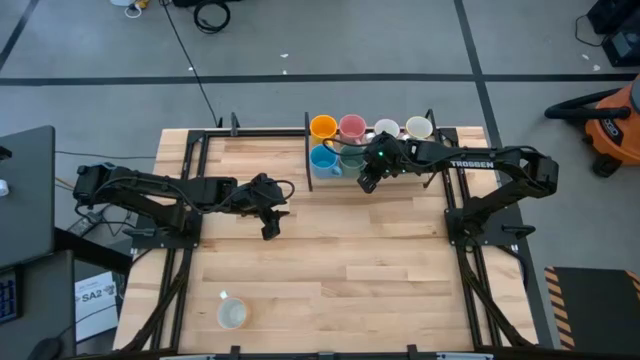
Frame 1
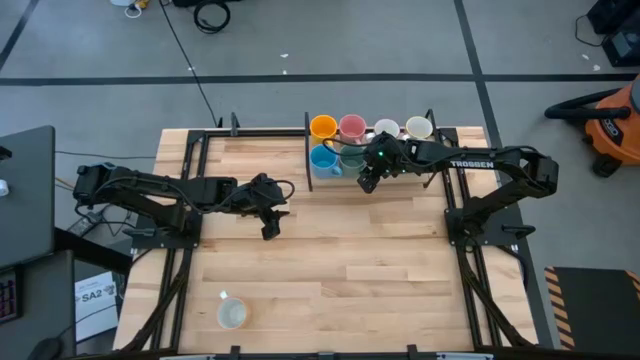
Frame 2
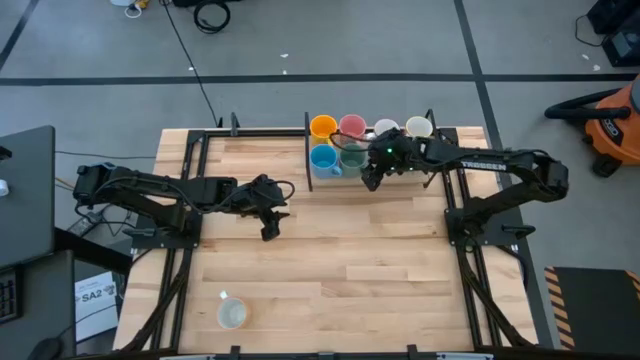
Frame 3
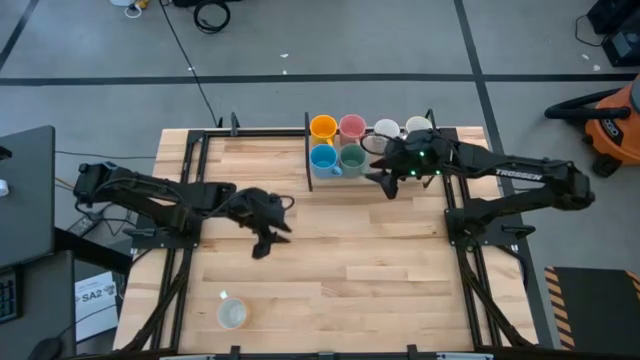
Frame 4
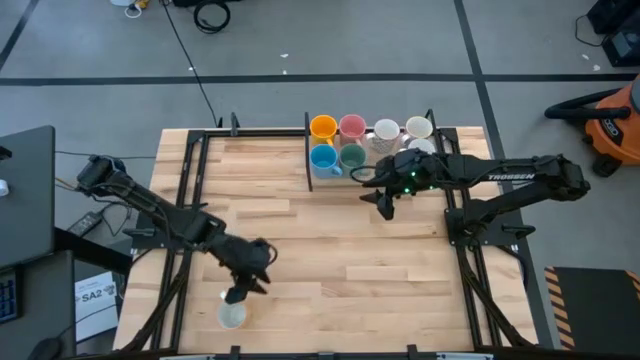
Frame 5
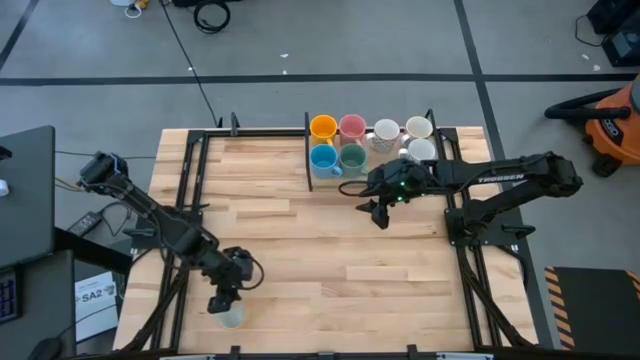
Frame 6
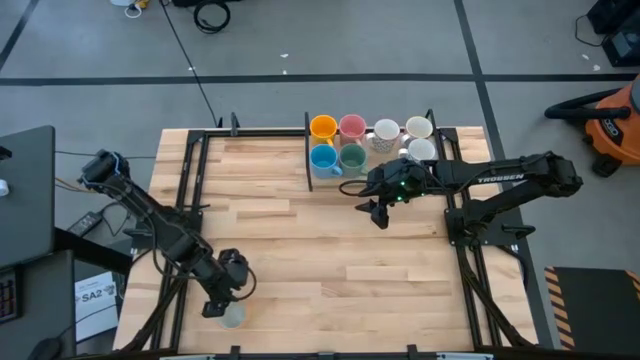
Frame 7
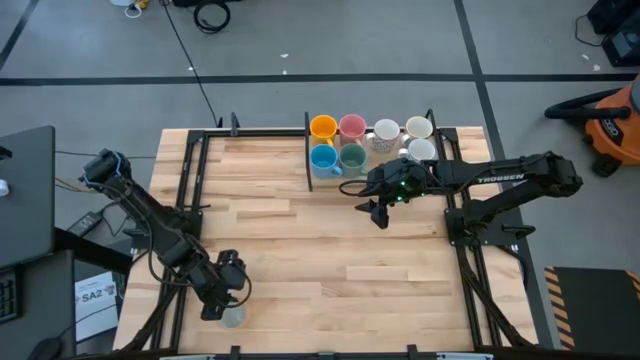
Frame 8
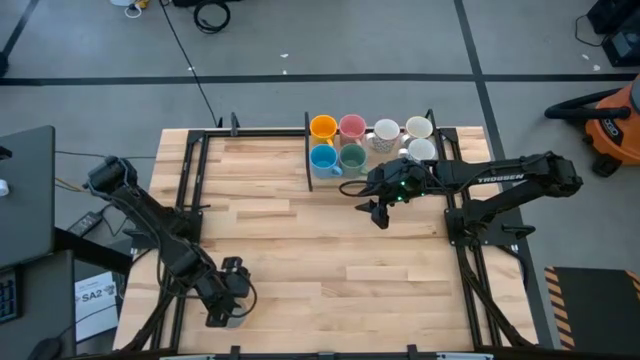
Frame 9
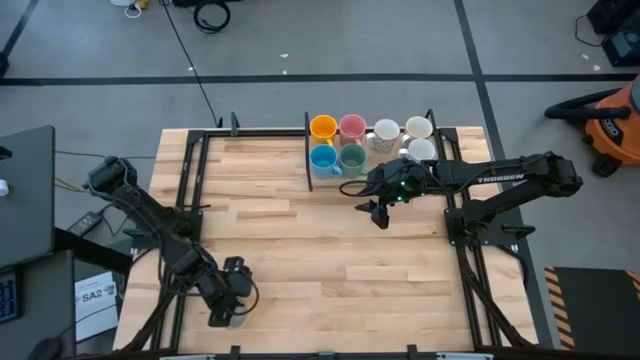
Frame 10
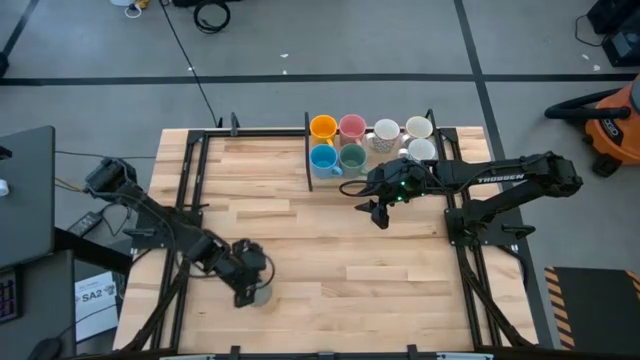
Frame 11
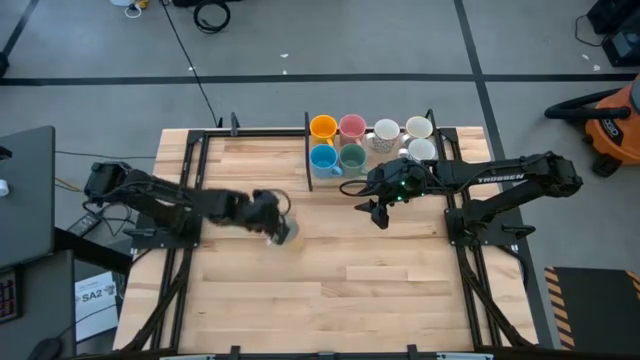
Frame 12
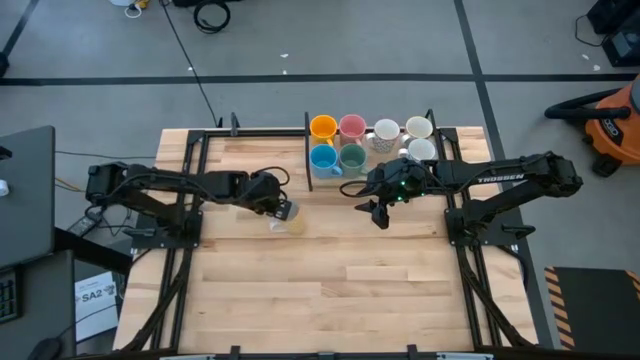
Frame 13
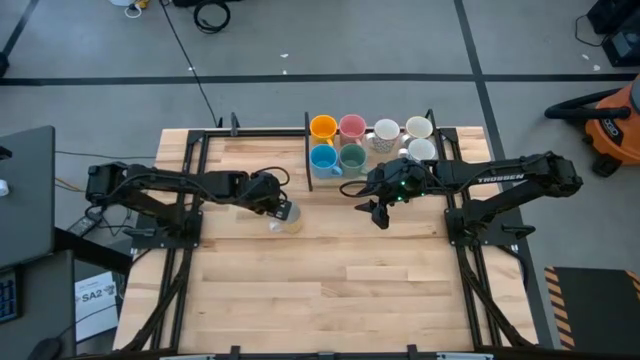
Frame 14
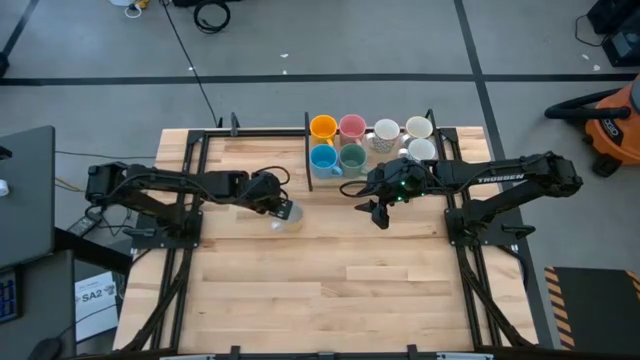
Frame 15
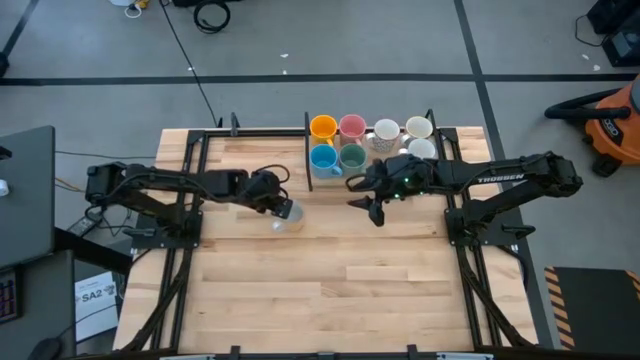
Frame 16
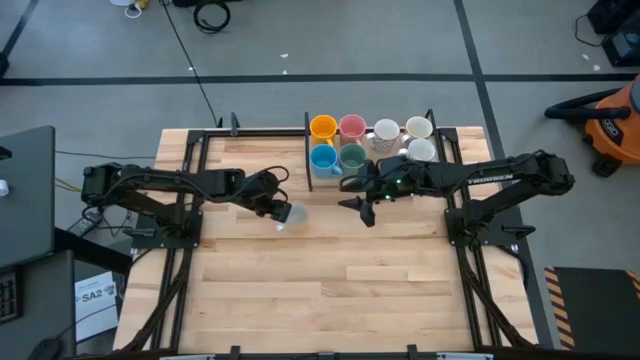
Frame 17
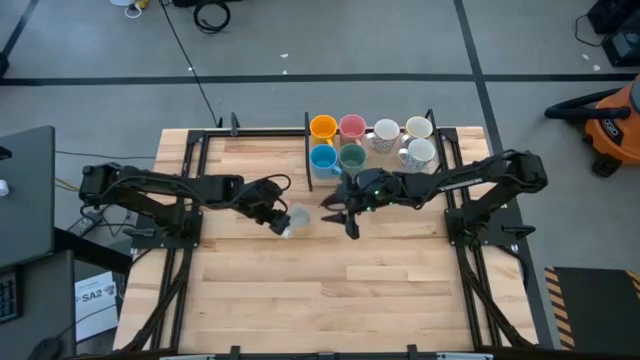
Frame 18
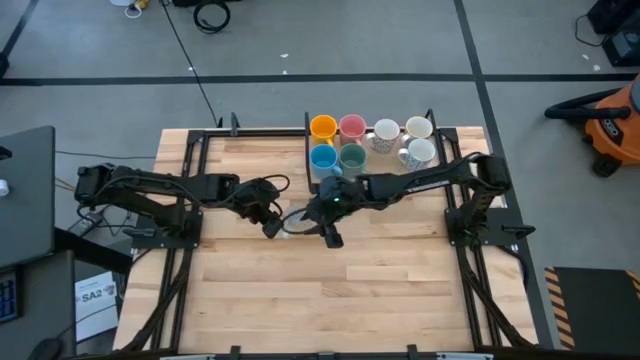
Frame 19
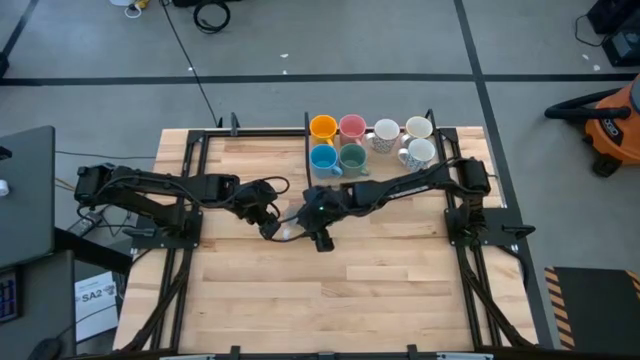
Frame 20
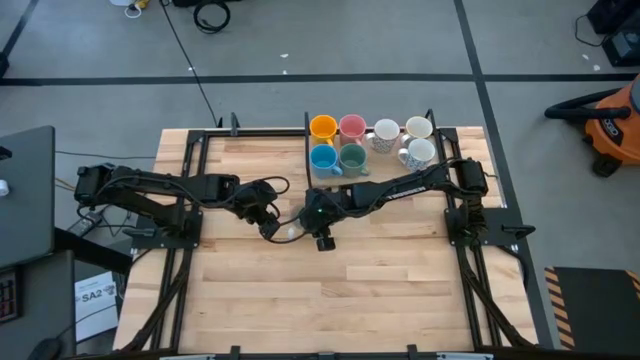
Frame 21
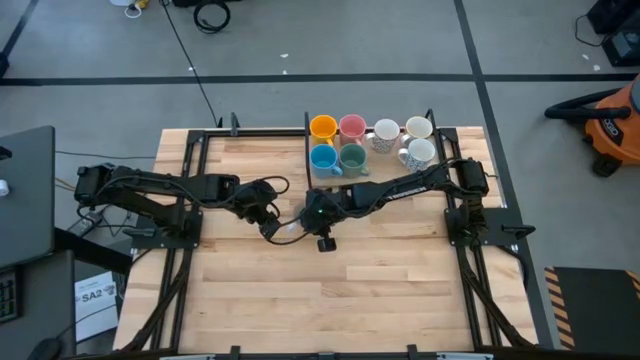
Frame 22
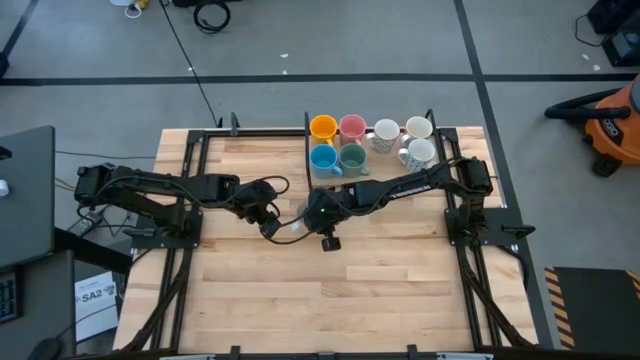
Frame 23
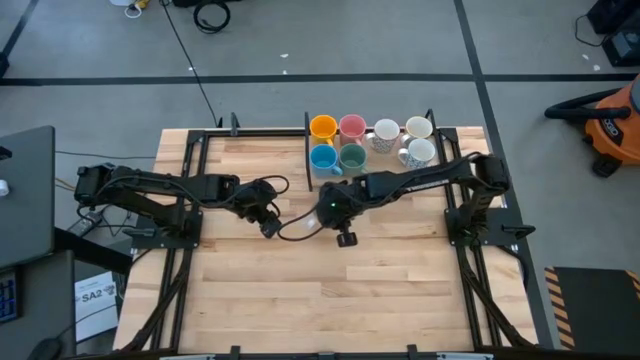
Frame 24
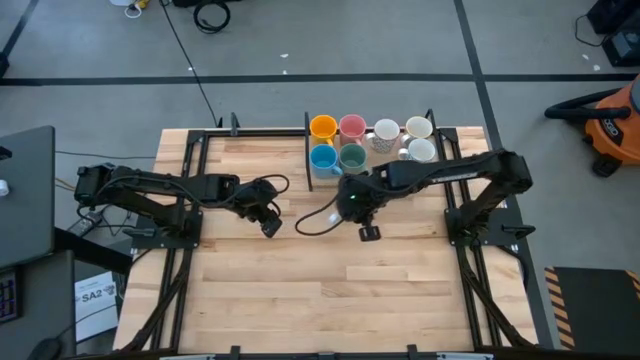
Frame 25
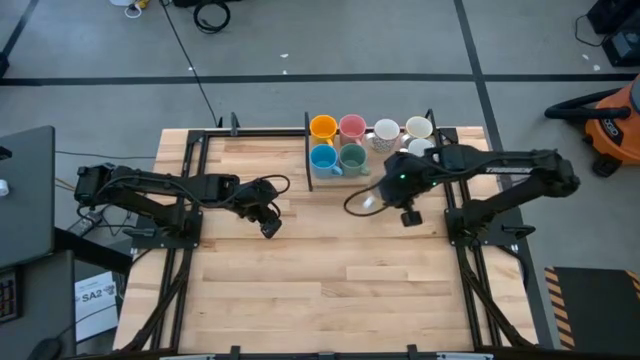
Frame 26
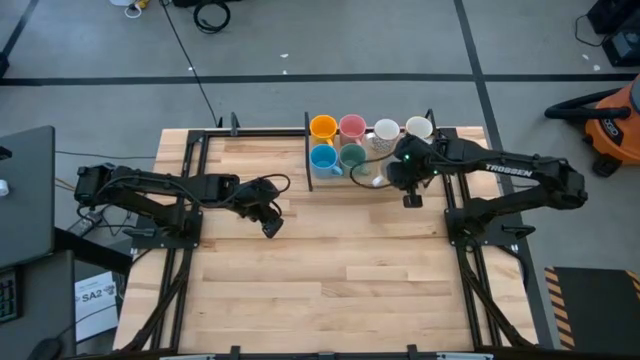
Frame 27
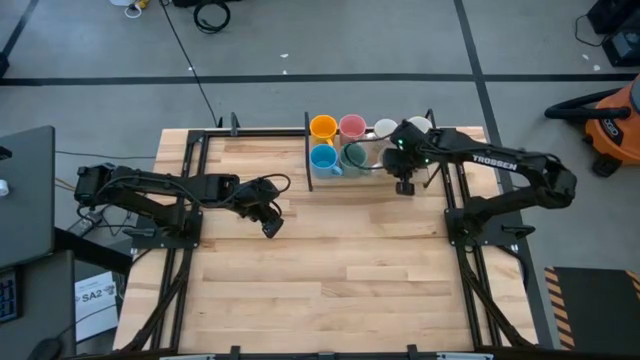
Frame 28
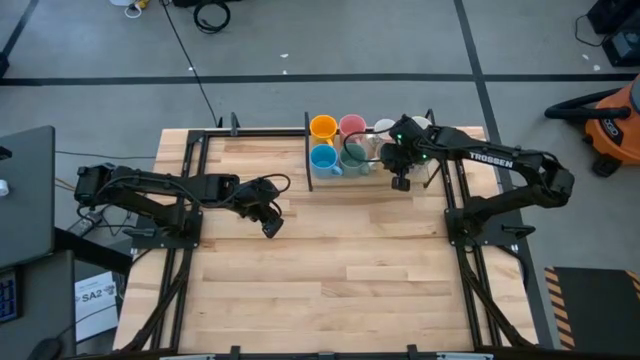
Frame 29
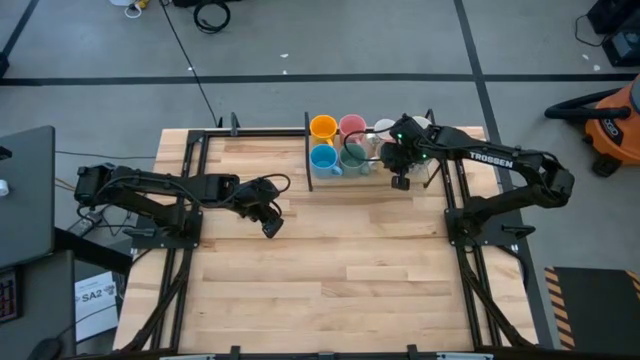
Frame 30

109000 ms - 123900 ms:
Task: Place coffee mugs
Put the yellow and white patterned mug on the shelf

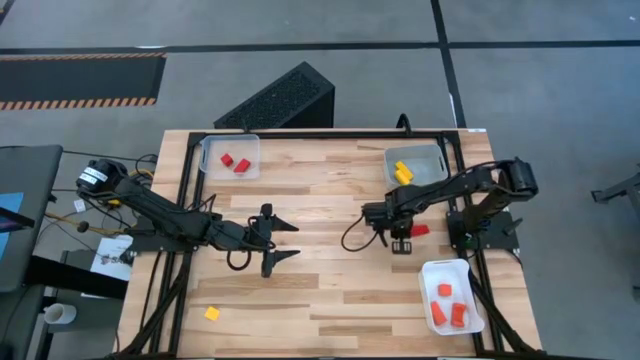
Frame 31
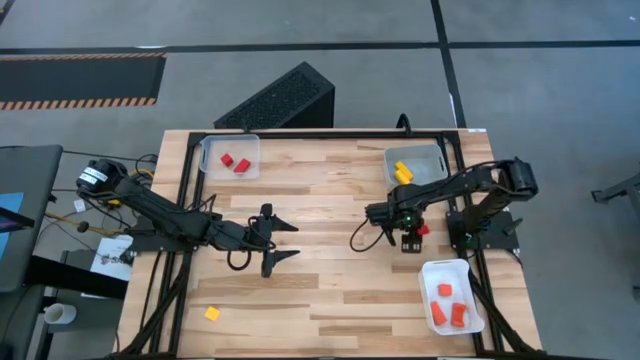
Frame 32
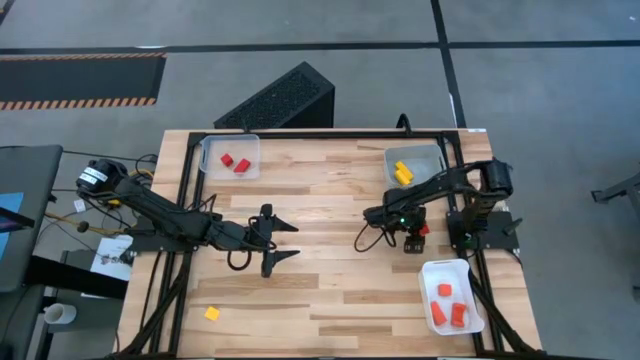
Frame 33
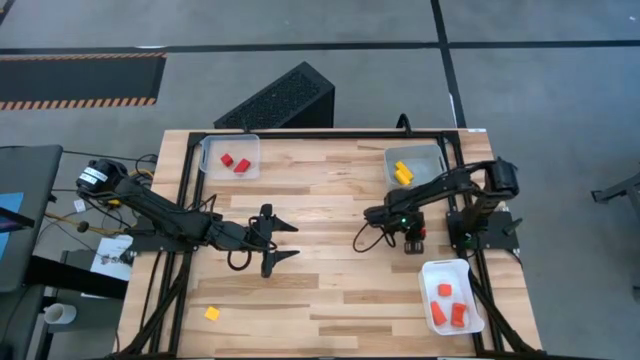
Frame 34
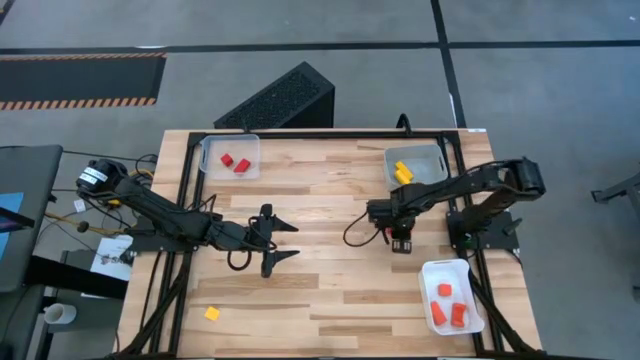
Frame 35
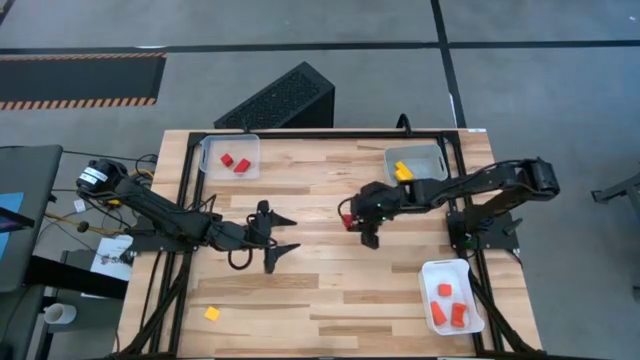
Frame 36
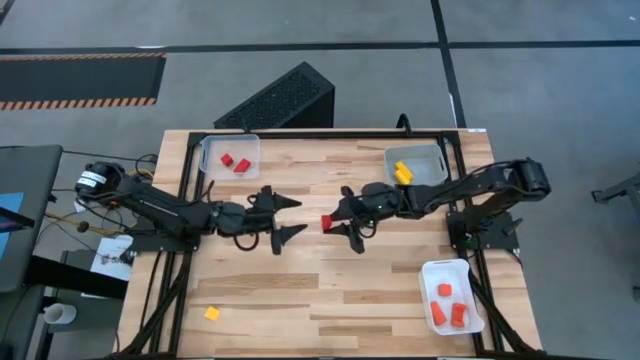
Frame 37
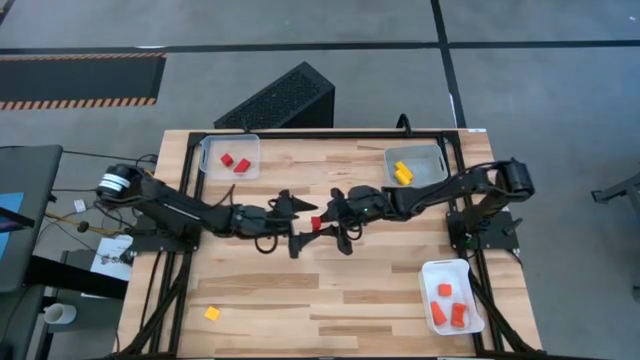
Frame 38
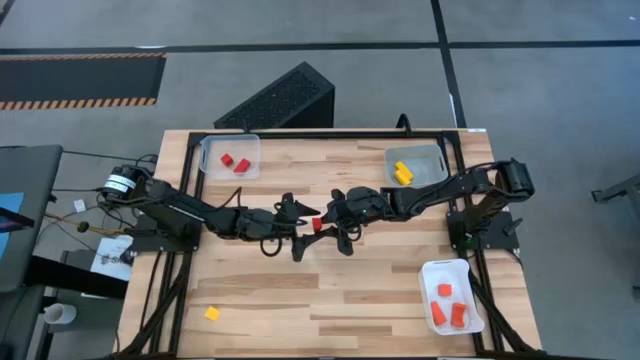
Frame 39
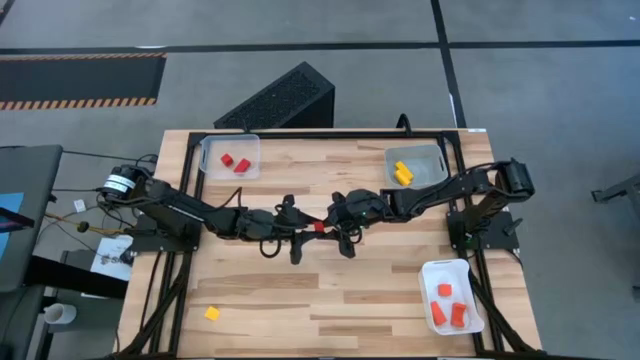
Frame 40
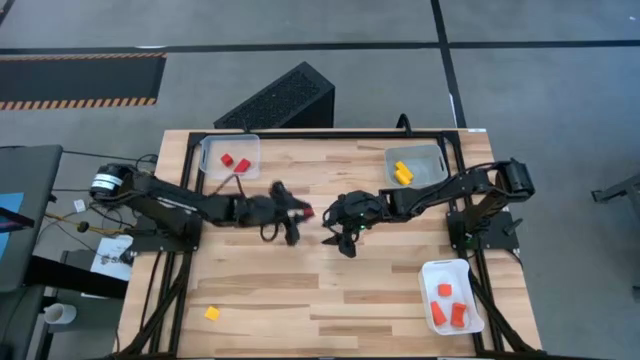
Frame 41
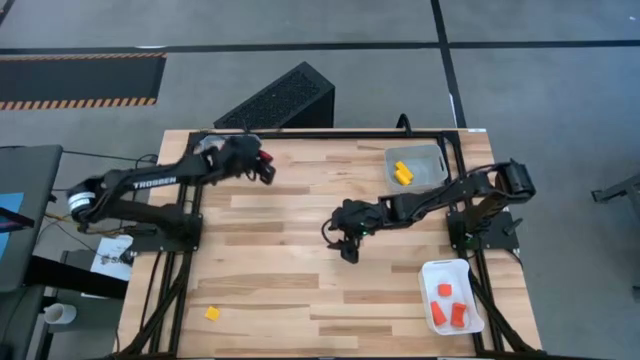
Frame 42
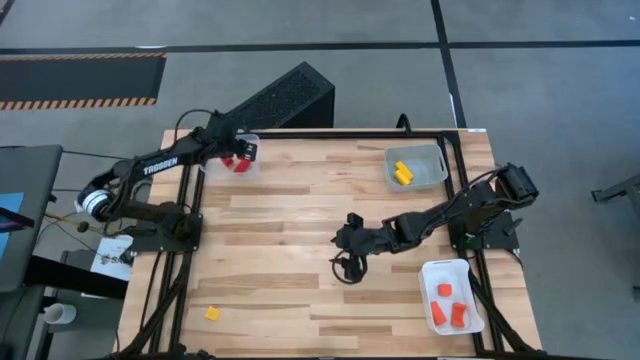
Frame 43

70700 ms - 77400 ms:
Task: Sort & place blocks by color
Put the red block into the transparent bin
